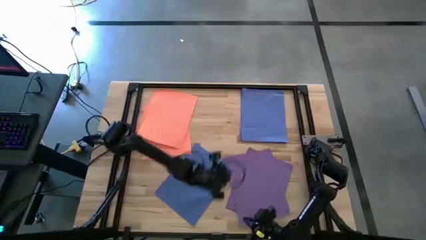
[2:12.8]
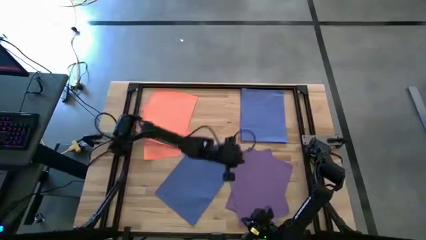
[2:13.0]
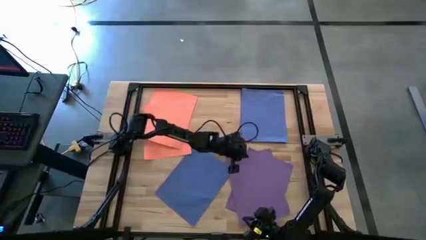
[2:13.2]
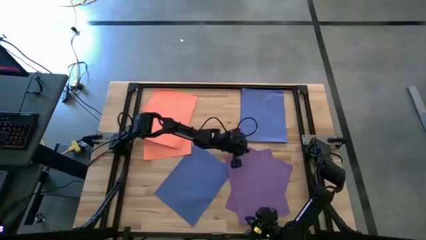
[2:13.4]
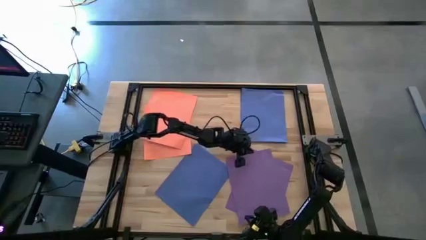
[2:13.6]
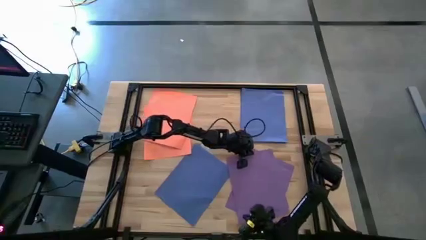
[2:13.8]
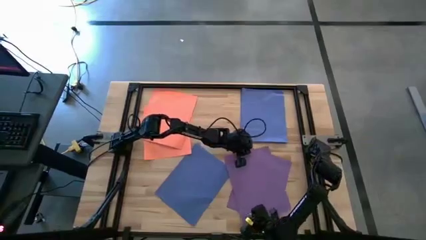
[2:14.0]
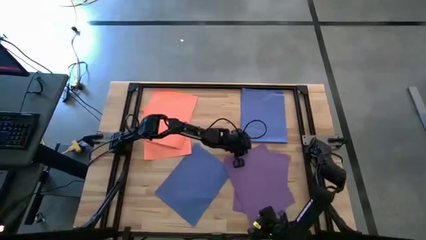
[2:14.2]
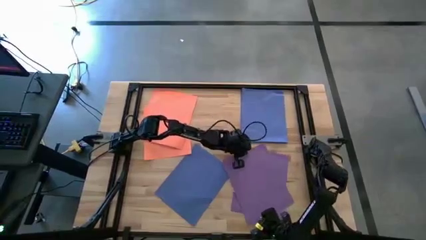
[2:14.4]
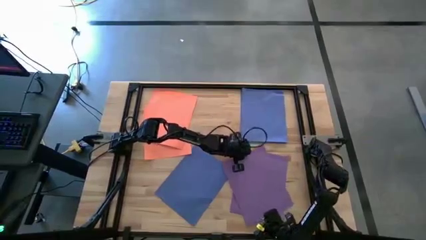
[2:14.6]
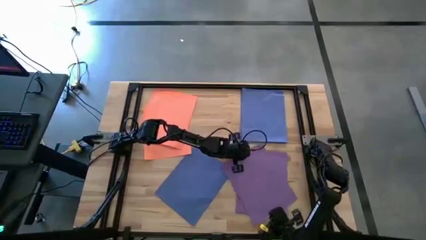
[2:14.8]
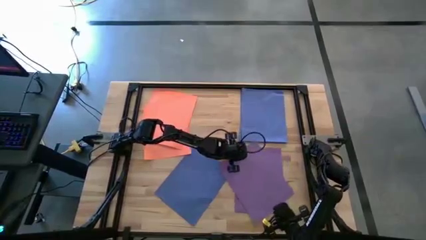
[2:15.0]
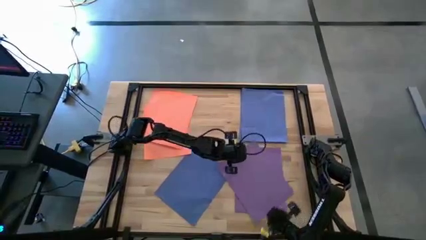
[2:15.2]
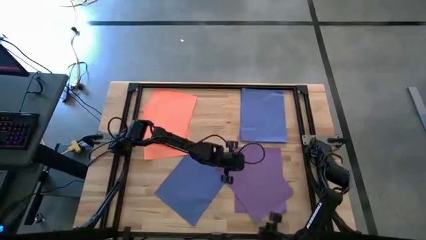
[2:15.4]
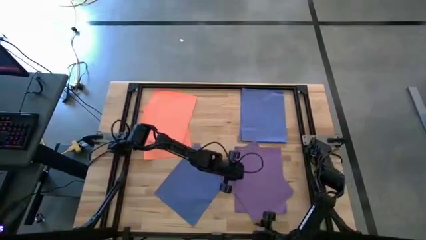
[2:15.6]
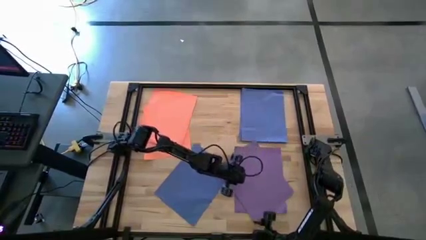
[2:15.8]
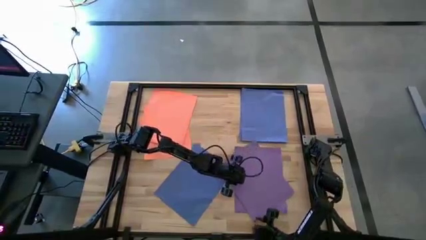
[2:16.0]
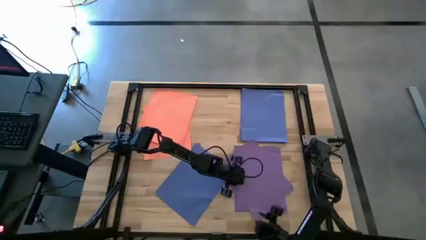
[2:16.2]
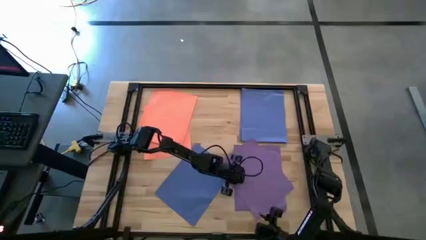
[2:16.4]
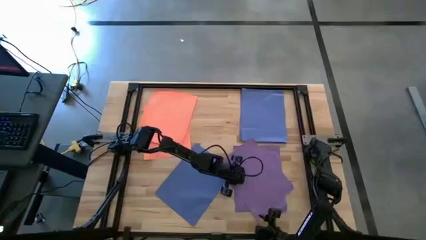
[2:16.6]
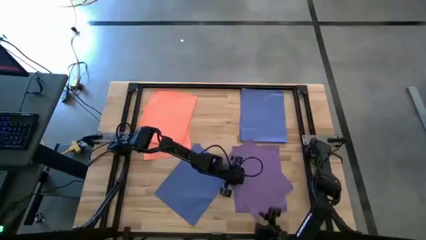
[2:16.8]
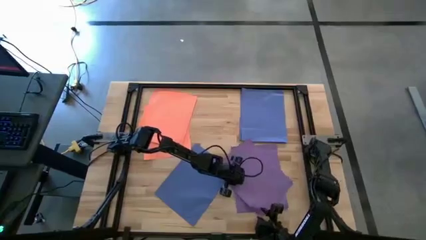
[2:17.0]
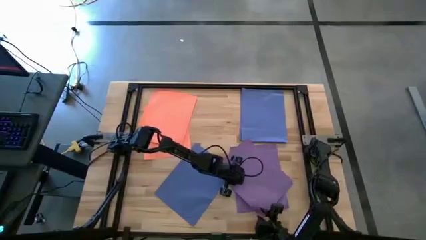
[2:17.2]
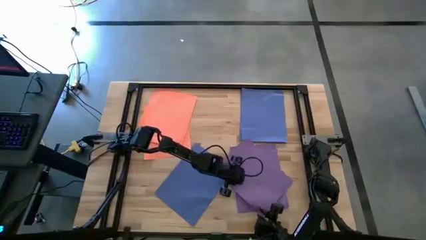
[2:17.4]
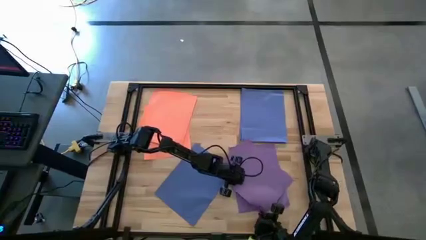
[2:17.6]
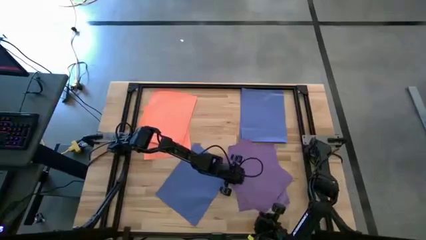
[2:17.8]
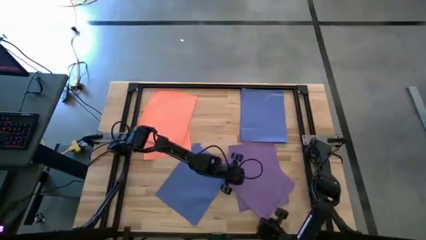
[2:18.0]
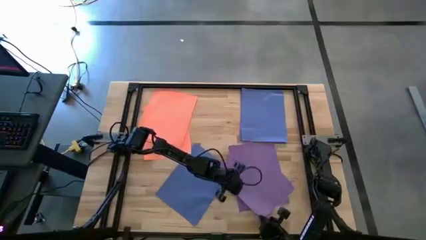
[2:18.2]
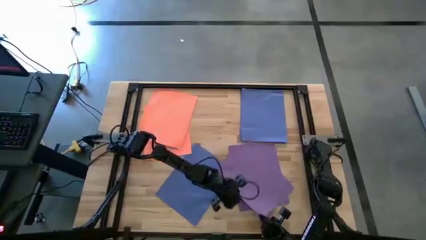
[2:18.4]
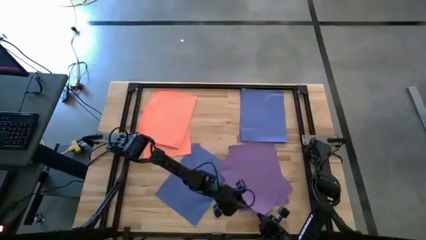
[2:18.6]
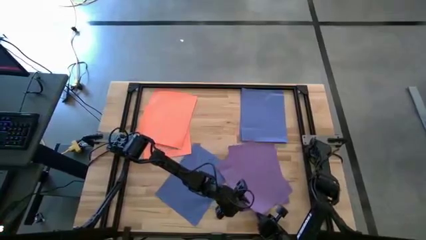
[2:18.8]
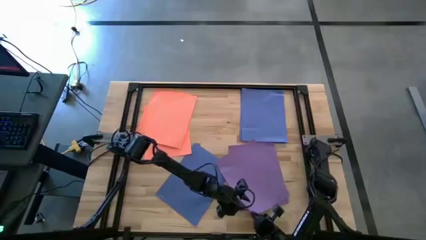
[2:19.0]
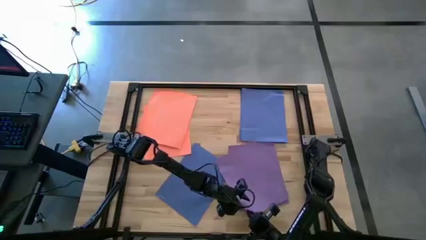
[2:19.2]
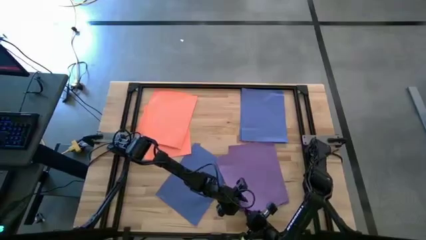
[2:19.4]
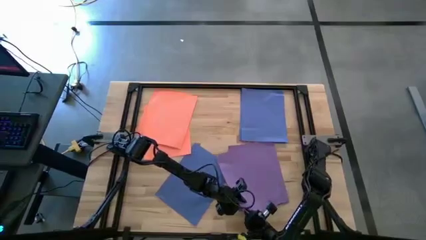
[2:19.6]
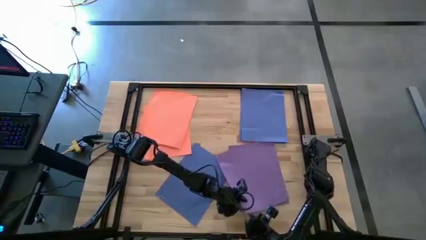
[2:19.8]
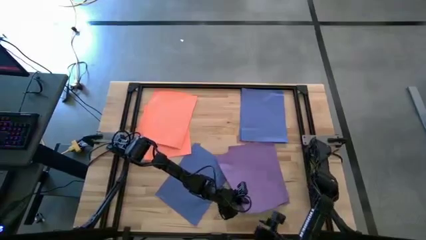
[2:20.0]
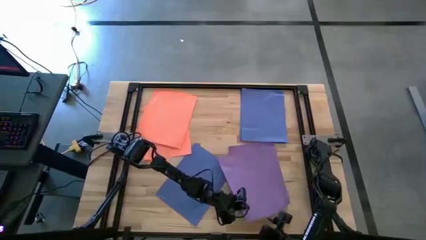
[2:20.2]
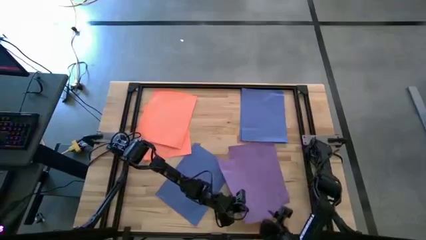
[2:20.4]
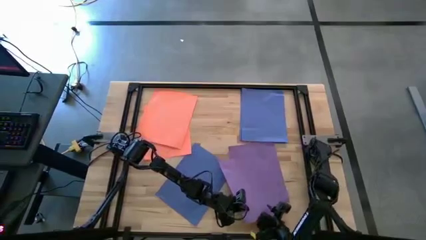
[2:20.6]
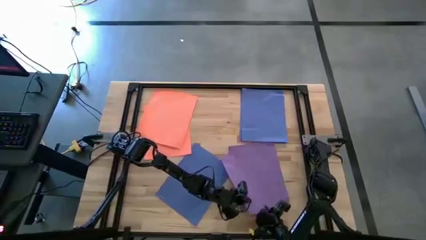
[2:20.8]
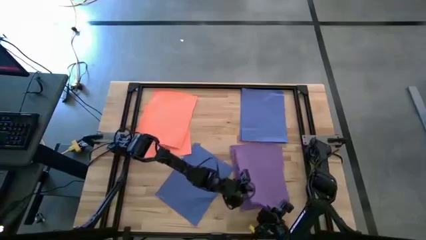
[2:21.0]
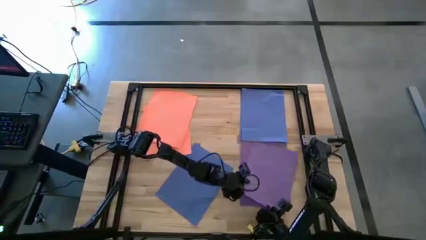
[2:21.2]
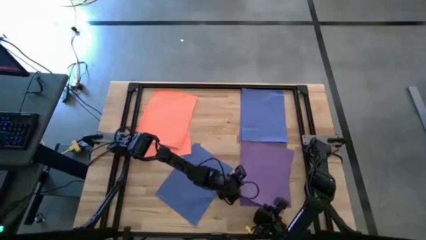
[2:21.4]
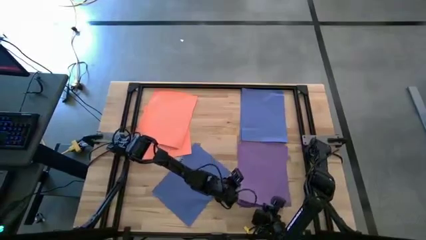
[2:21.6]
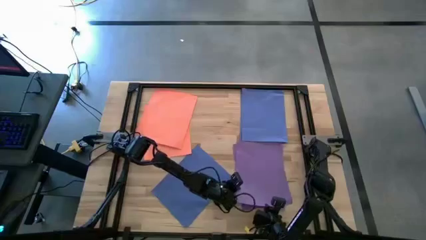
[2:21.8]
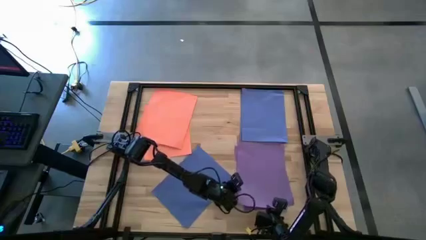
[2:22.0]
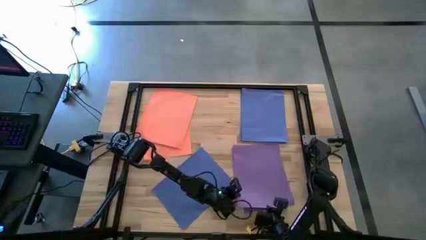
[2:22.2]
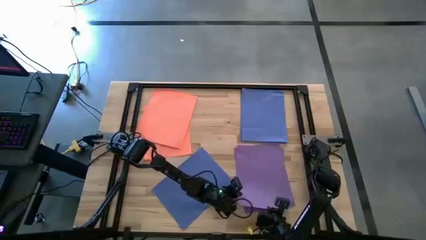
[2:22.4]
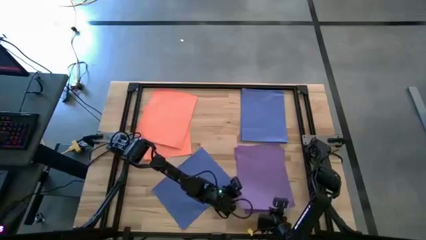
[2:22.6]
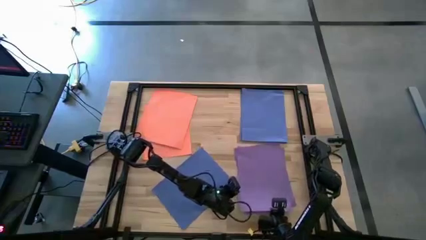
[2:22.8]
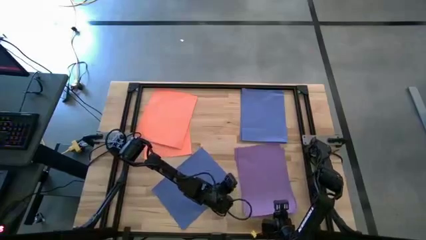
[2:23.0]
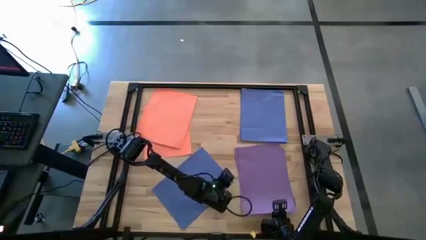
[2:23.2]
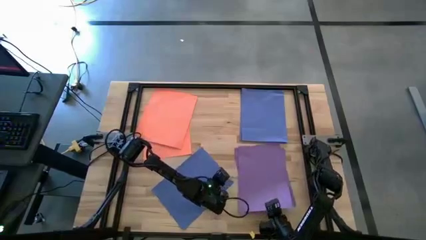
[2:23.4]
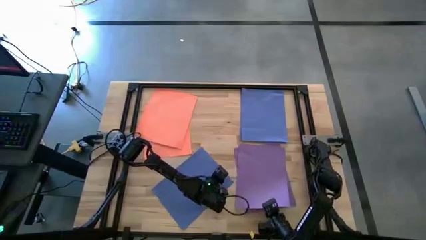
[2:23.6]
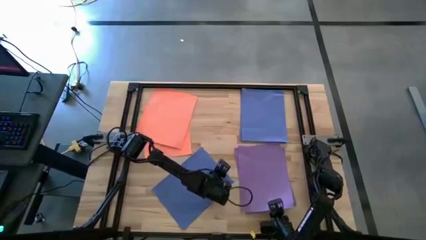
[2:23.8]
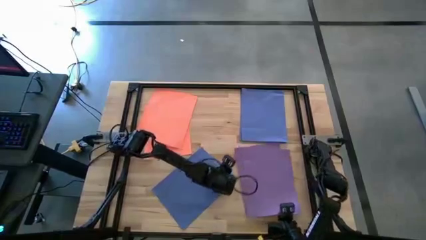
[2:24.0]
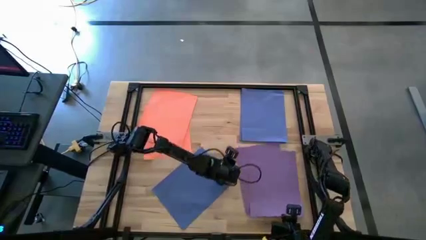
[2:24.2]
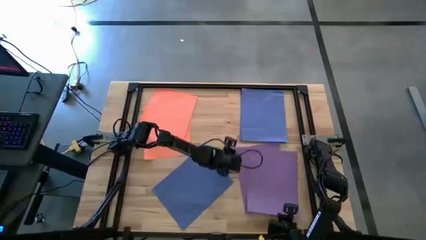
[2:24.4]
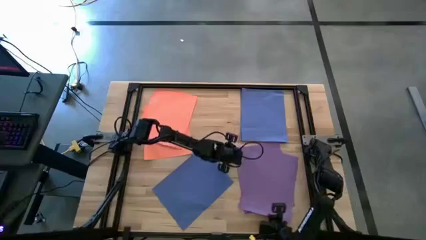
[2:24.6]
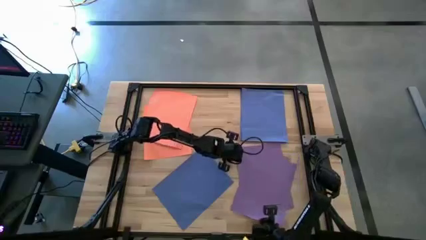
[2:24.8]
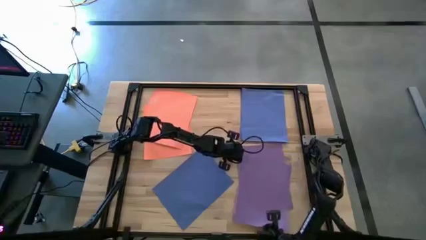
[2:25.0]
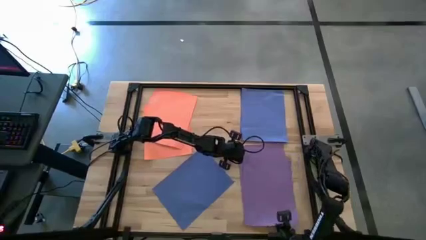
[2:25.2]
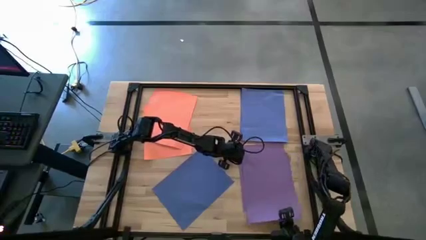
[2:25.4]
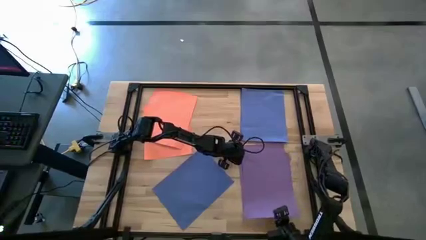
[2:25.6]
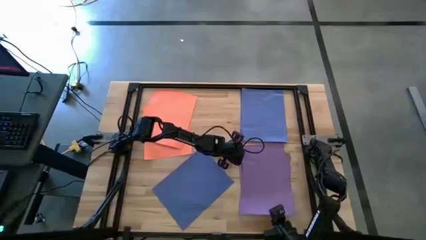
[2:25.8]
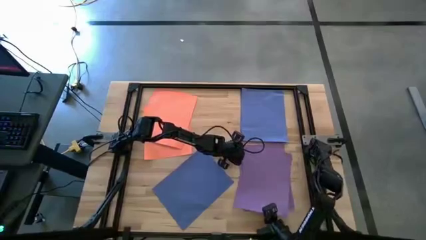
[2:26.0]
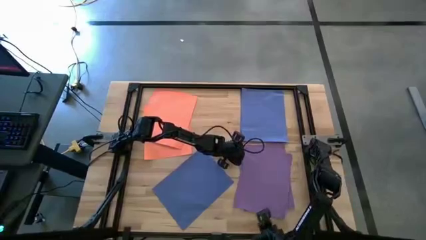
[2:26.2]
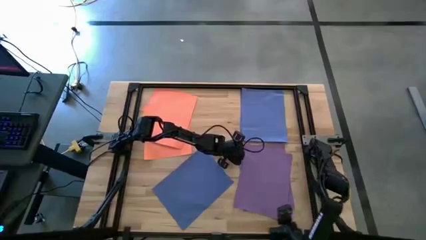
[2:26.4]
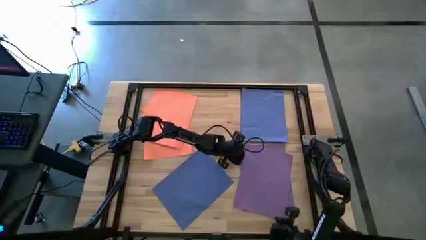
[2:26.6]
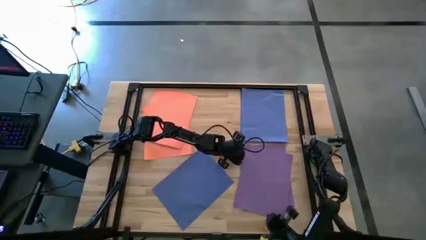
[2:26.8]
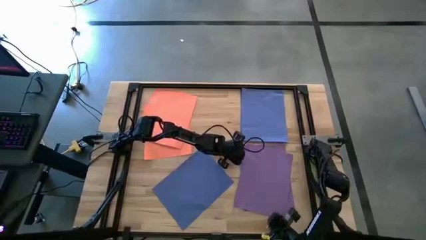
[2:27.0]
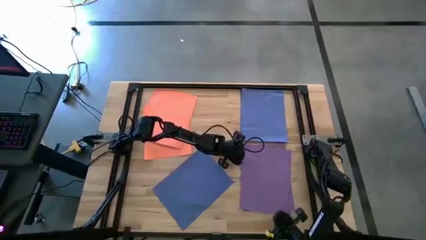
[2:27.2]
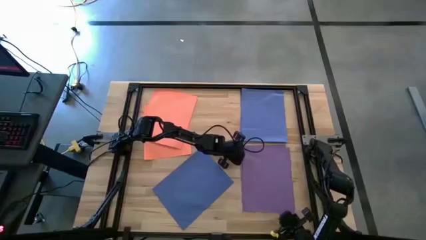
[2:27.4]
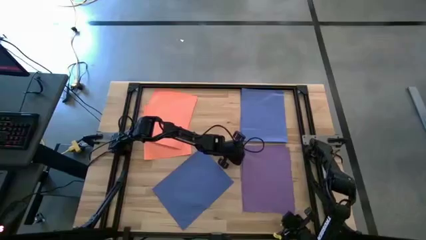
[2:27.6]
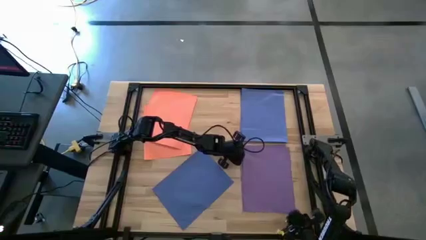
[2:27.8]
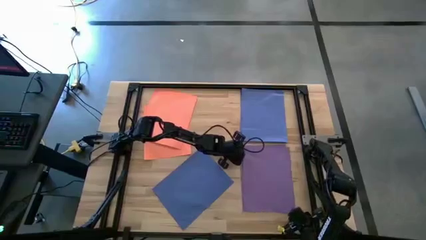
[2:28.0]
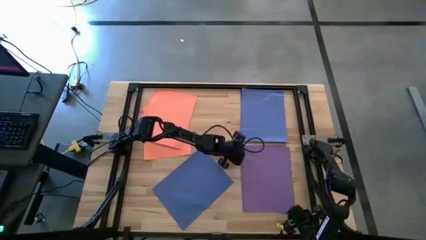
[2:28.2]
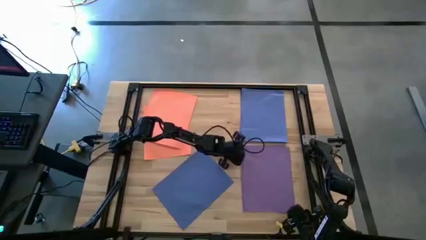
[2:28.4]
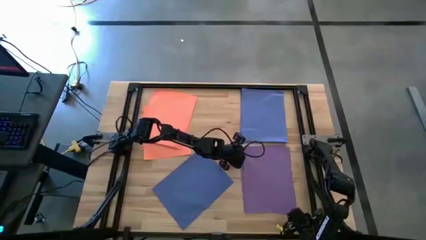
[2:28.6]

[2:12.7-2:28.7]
Task: Organize paper
Stack the purple paper on top of the purple paper
